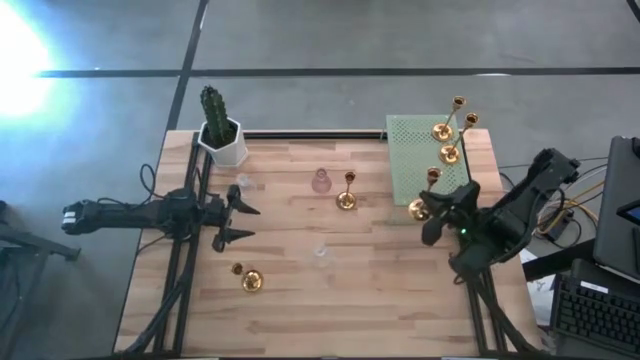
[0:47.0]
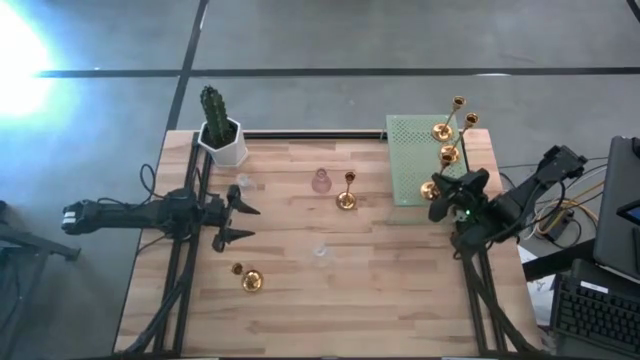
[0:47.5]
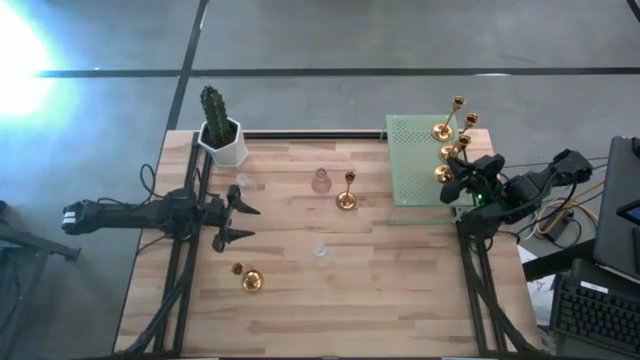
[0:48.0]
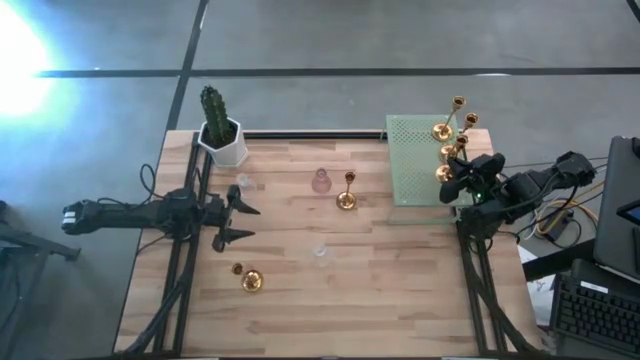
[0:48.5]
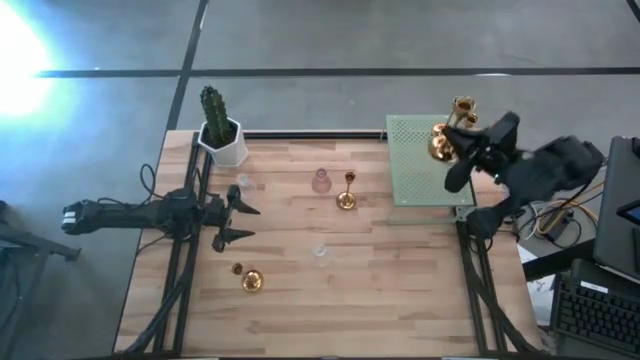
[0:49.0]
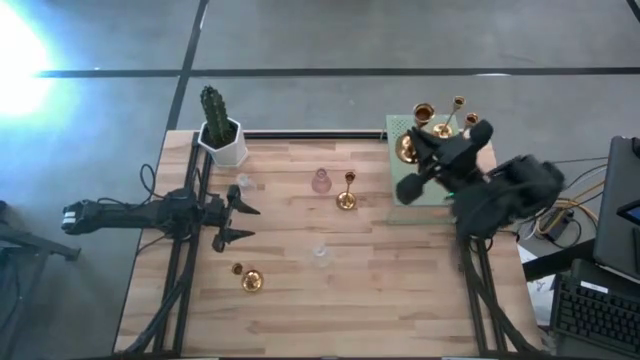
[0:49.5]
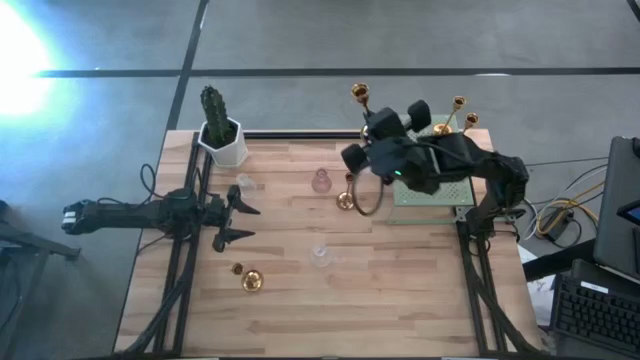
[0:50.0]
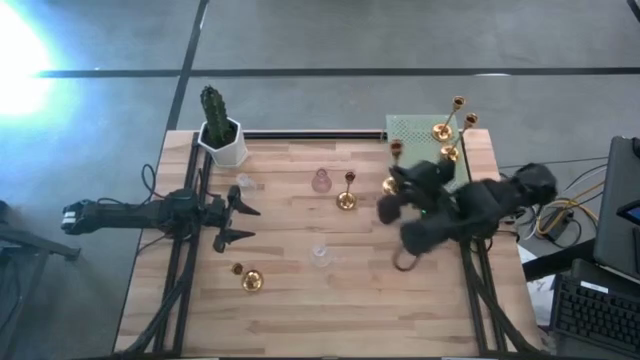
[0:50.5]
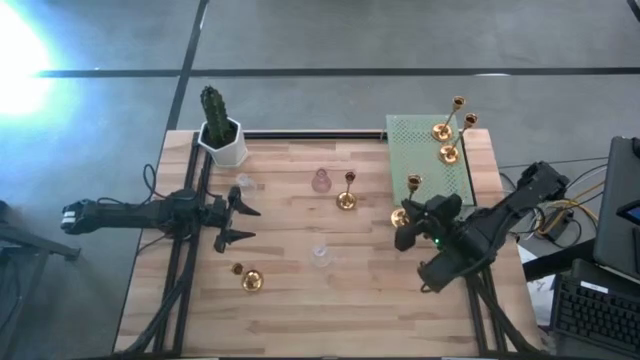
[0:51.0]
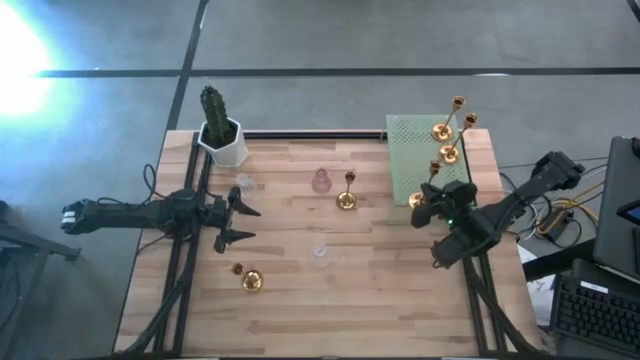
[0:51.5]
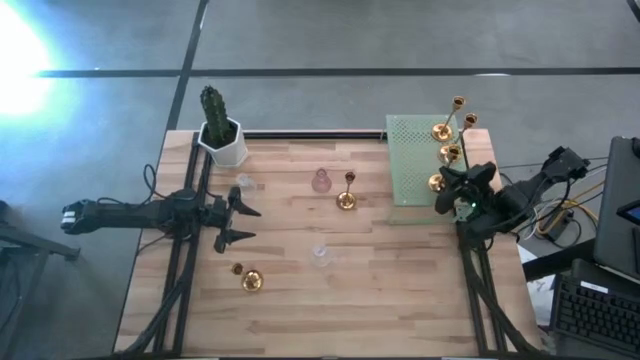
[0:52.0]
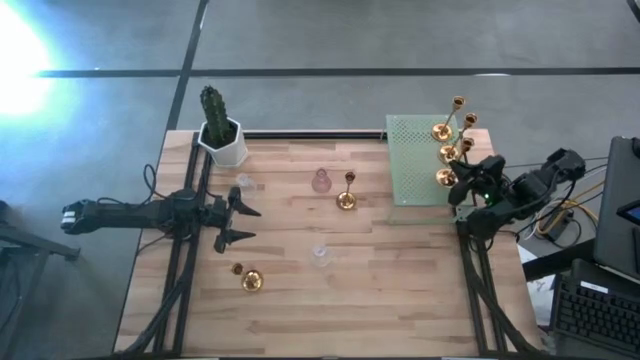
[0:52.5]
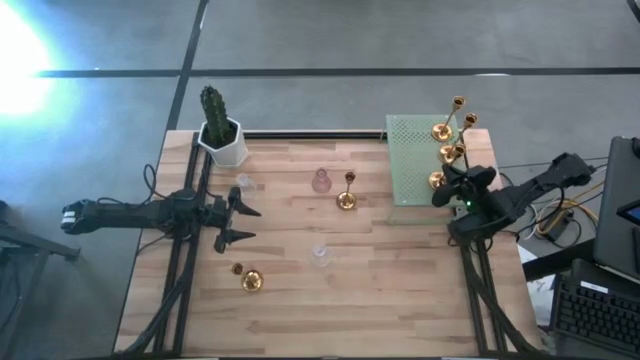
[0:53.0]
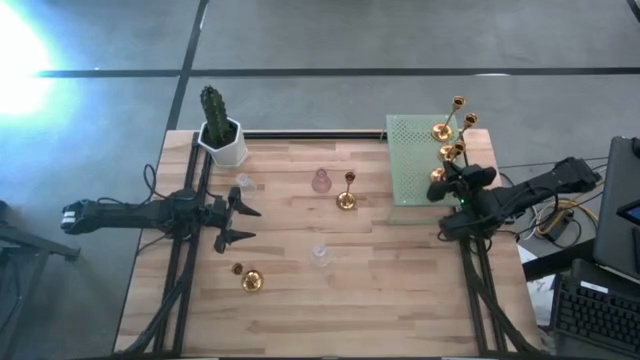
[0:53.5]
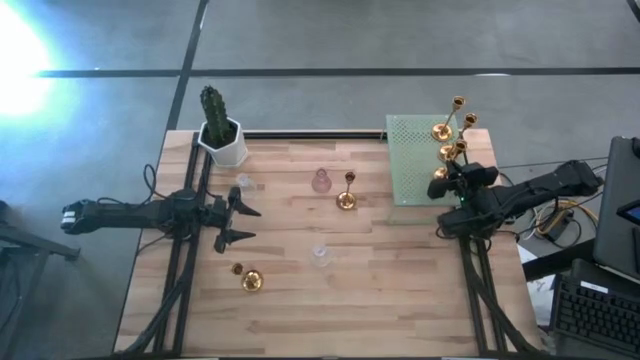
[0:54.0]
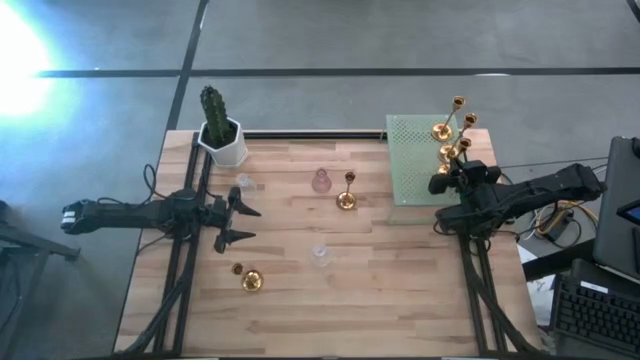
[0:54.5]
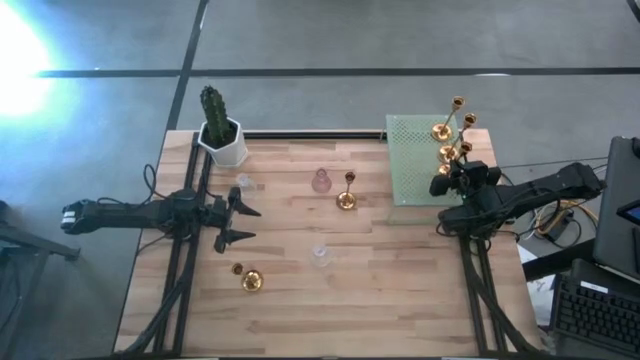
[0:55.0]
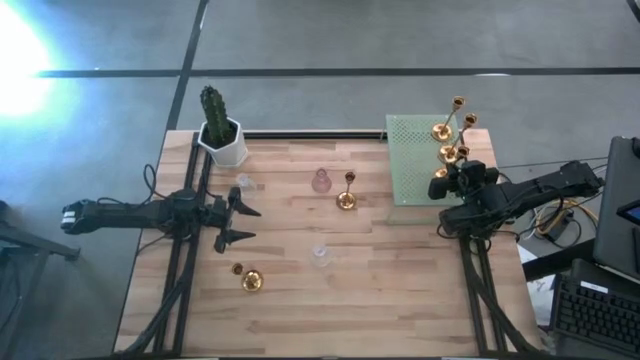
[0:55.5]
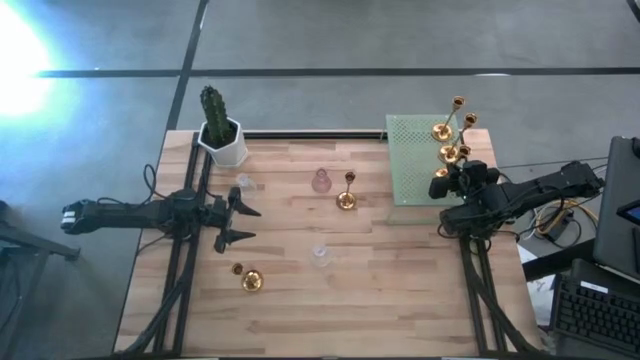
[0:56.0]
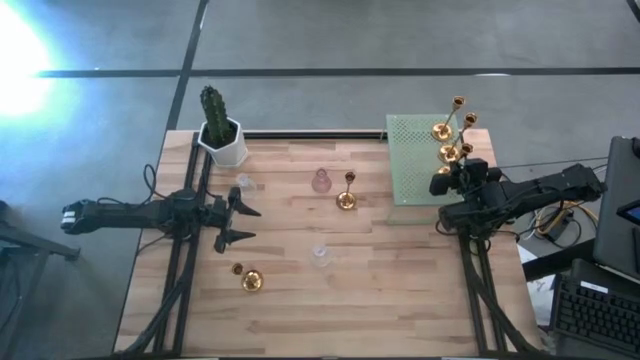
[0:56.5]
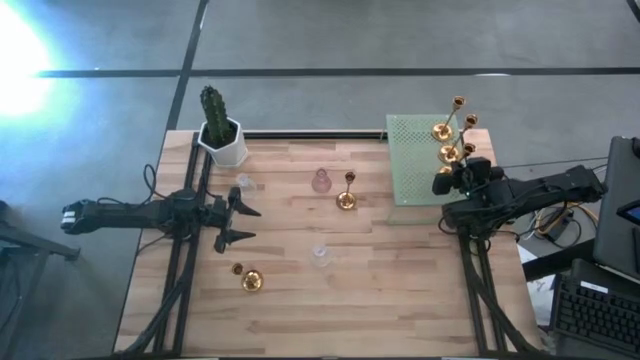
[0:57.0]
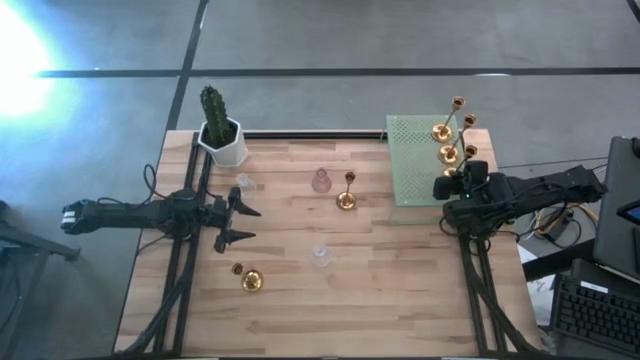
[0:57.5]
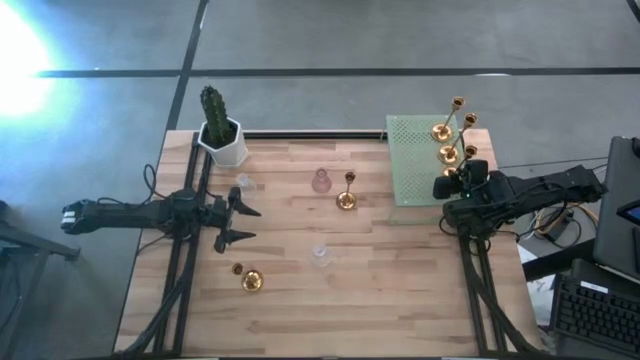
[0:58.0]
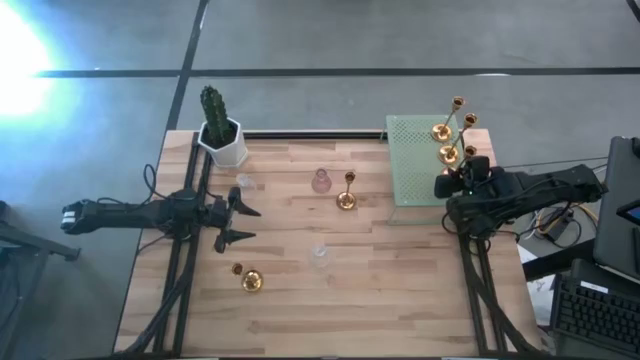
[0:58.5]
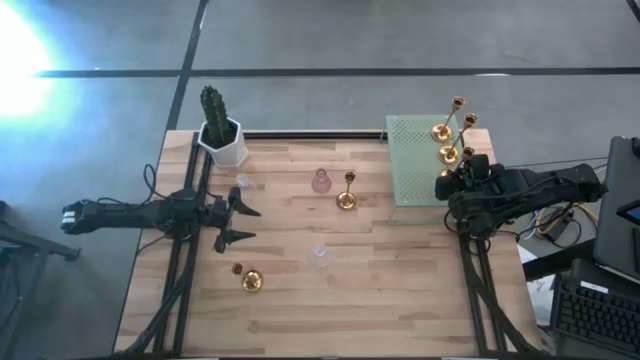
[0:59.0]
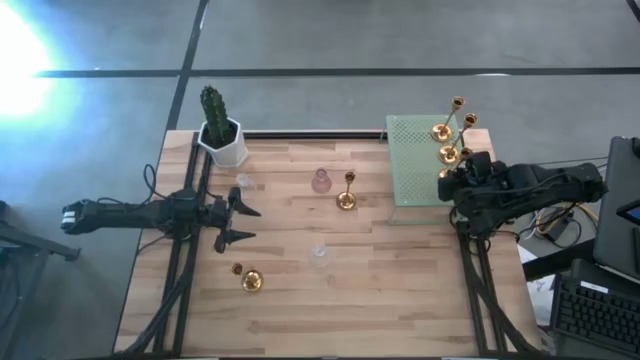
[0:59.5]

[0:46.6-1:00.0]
Task: Pick & Place candle stick holders
Put the middle gold candle holder on the shelf

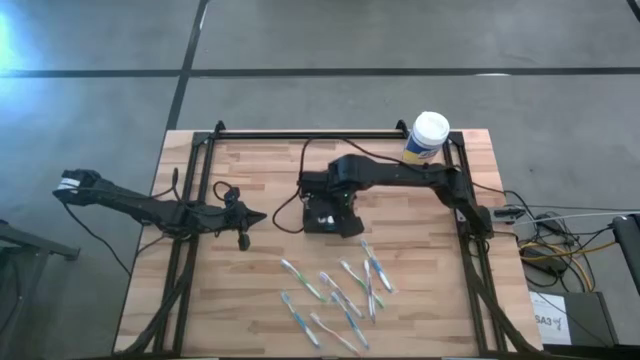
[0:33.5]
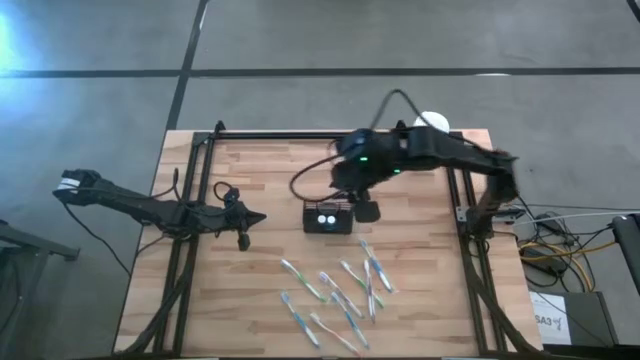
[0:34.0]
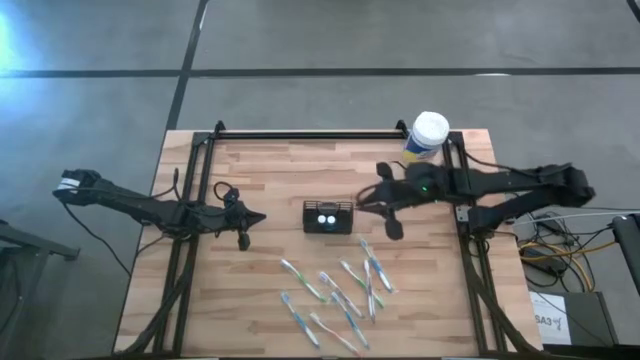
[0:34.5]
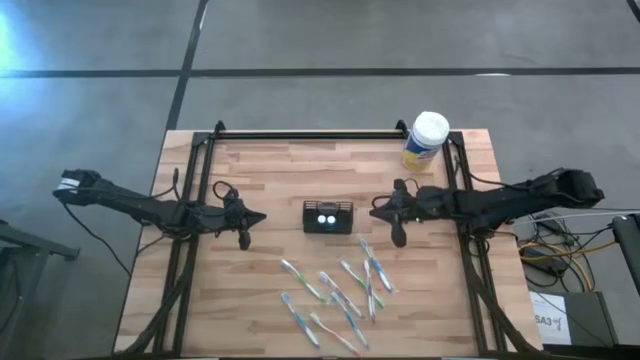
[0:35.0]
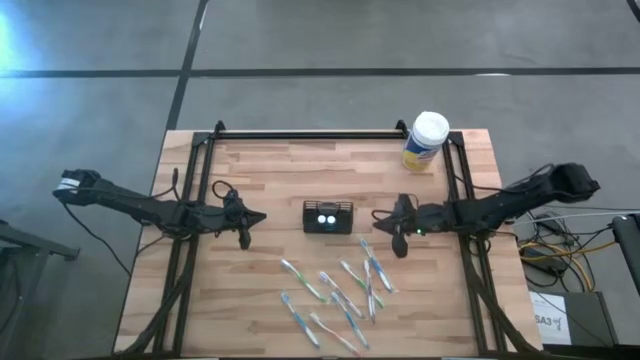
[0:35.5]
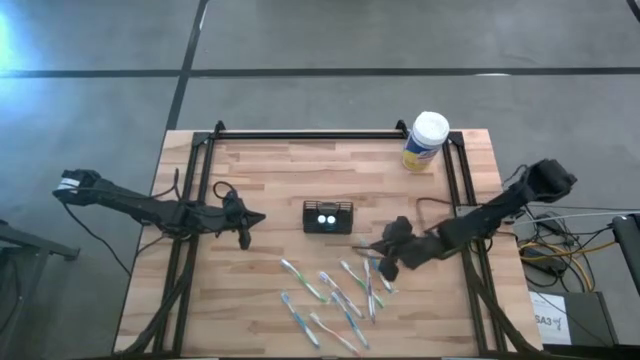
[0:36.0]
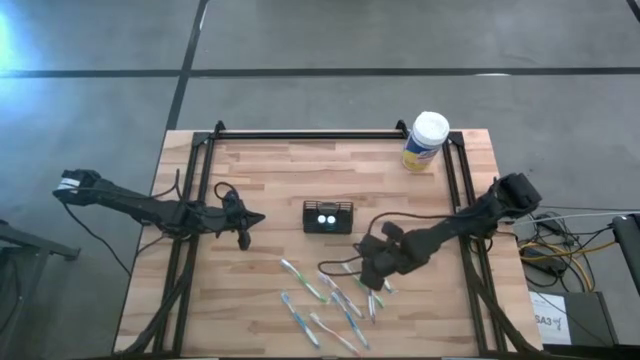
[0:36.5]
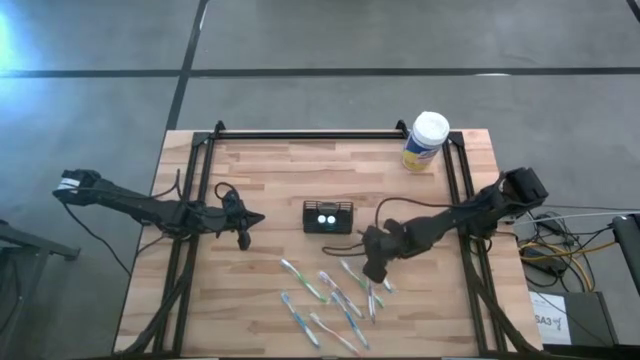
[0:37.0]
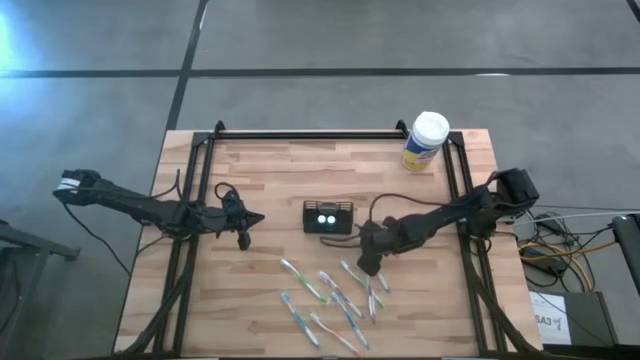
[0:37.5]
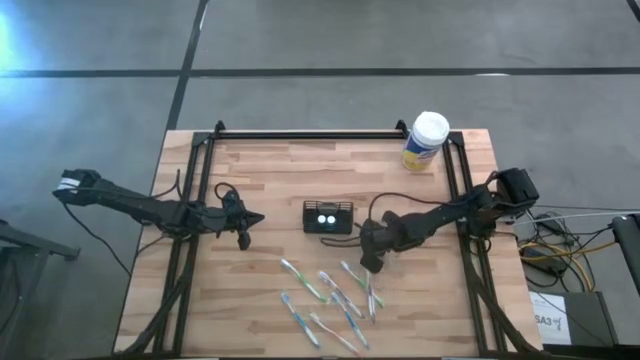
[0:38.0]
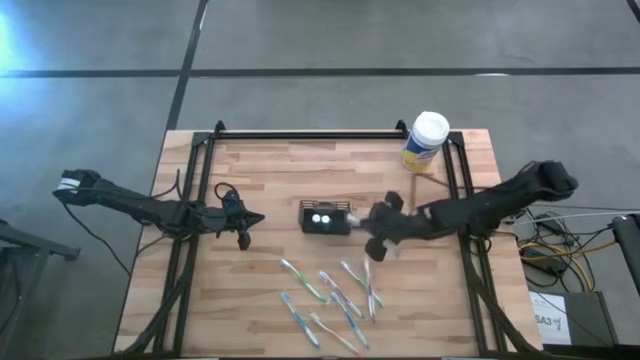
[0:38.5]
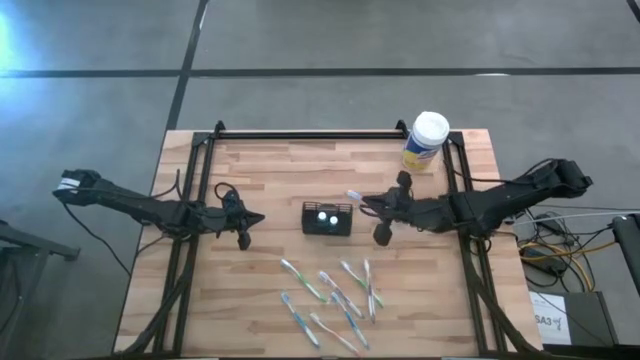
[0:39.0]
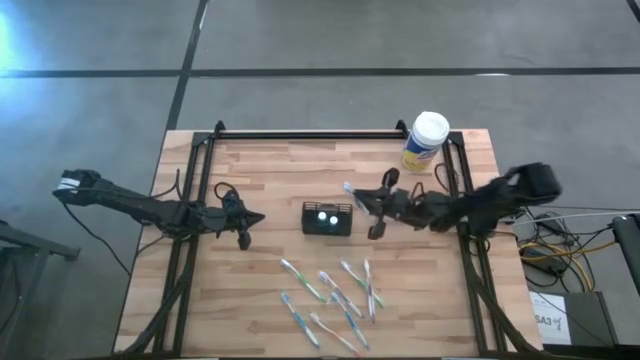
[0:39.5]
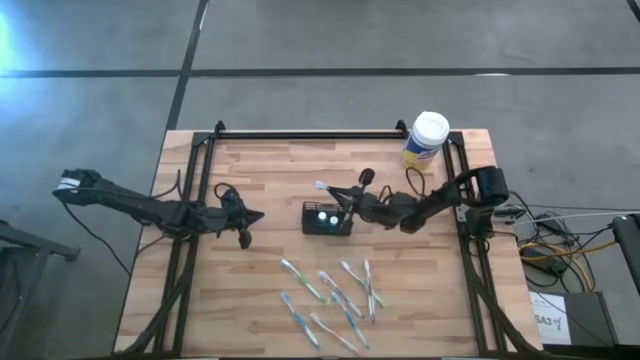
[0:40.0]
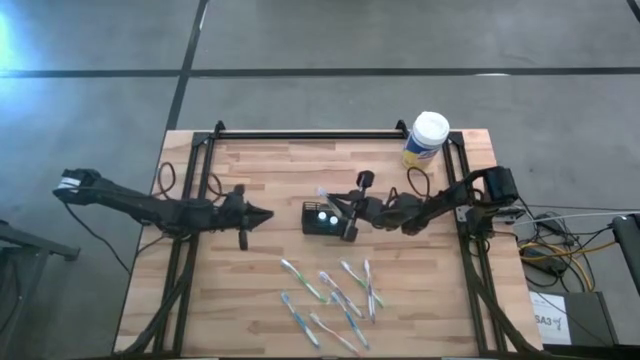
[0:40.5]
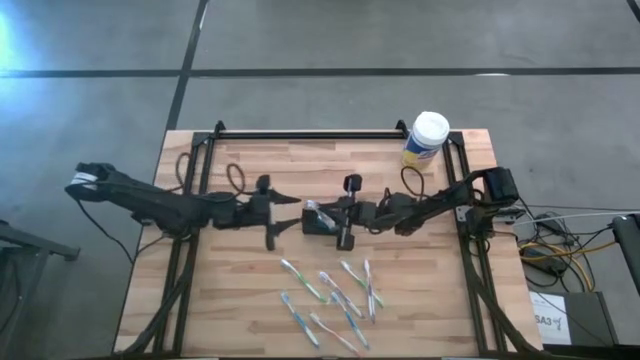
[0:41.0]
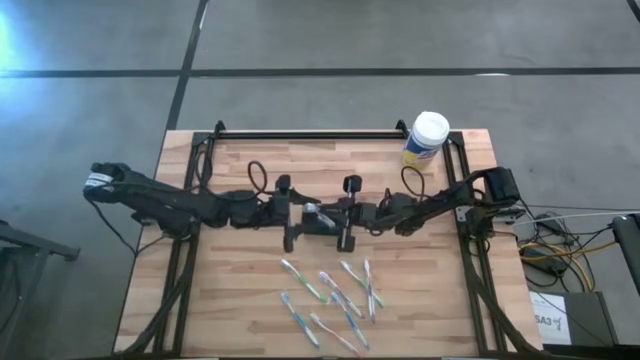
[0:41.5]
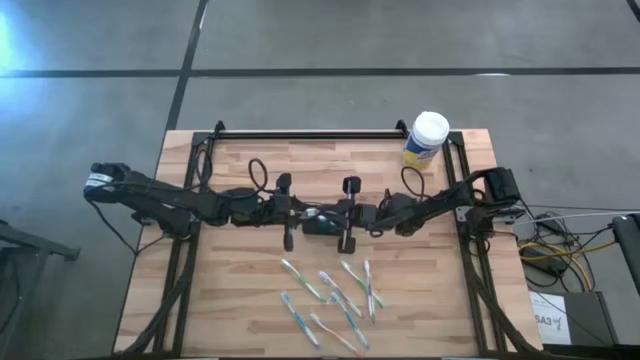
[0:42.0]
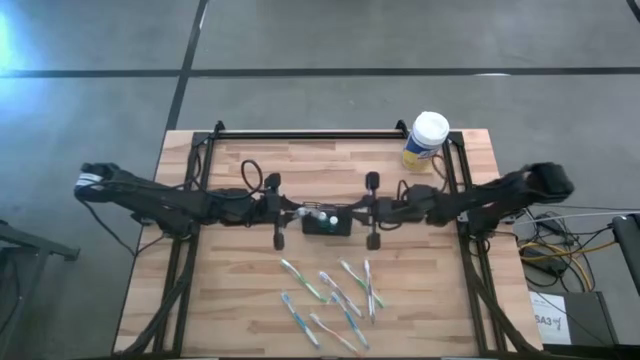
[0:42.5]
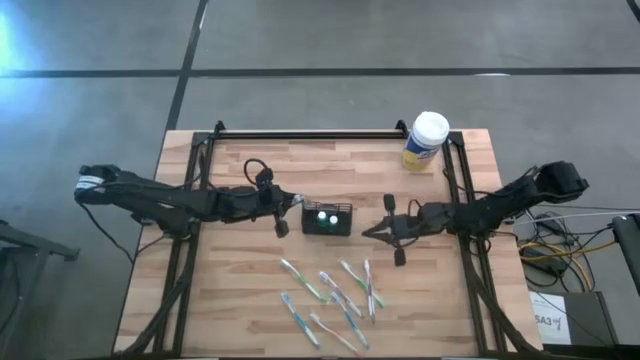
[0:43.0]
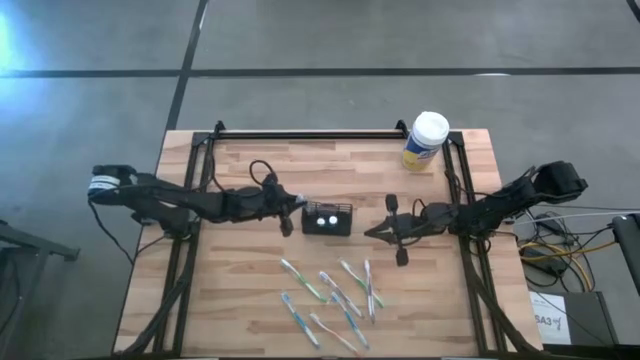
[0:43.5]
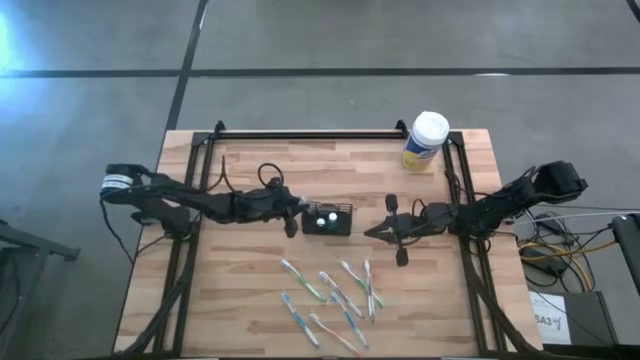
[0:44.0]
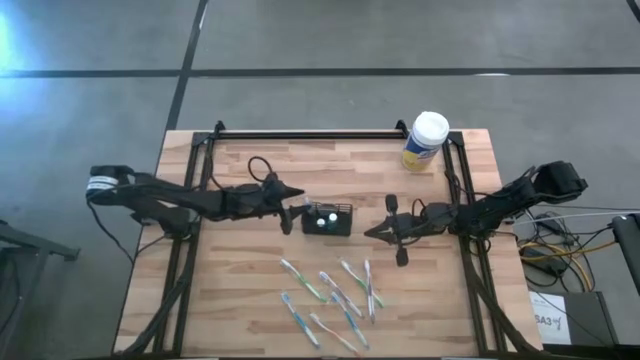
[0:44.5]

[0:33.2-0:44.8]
Task: Pick & Place toothbrushing station
Put the right blue toothbrush into the black mesh organizer
